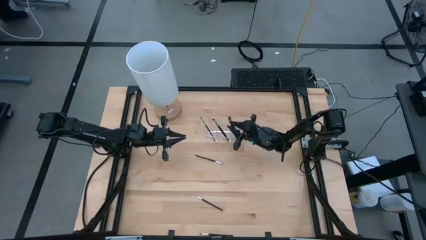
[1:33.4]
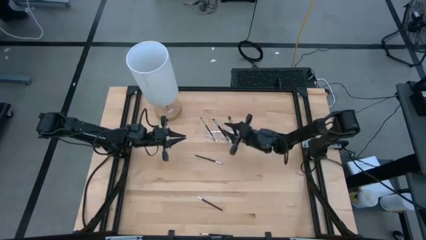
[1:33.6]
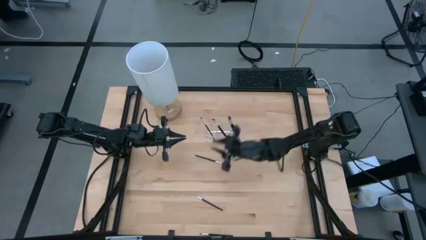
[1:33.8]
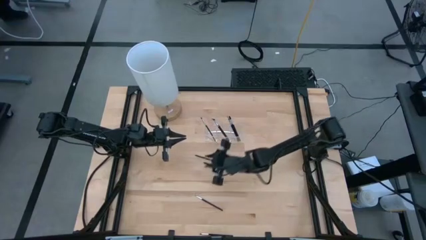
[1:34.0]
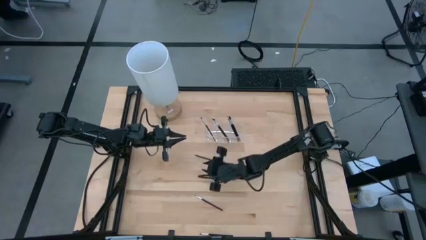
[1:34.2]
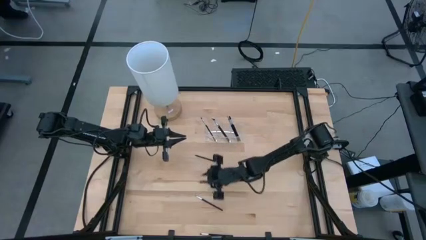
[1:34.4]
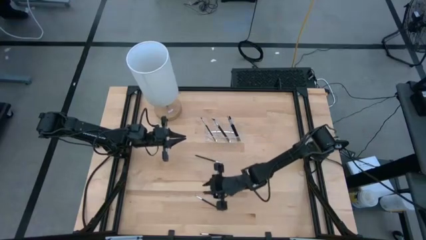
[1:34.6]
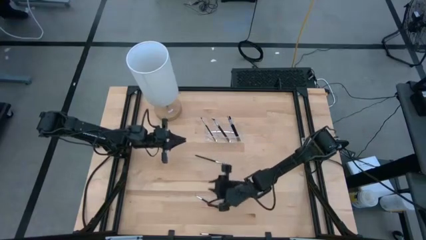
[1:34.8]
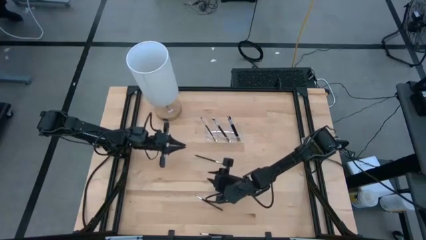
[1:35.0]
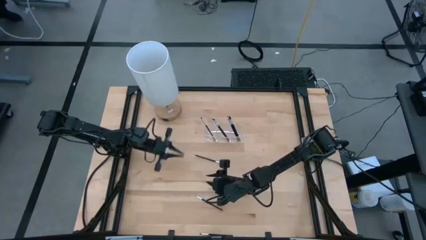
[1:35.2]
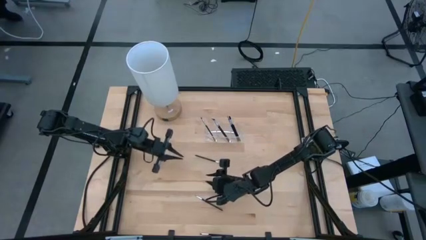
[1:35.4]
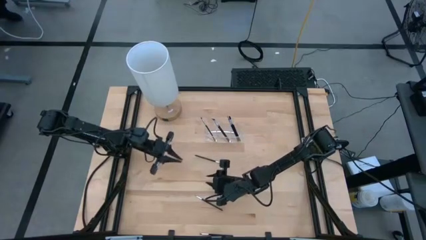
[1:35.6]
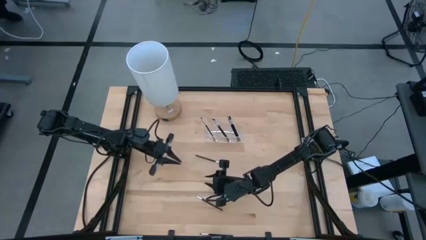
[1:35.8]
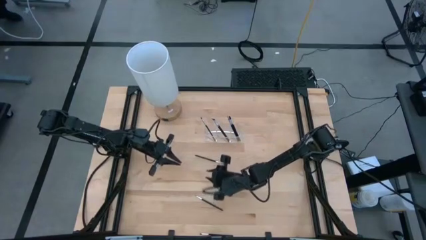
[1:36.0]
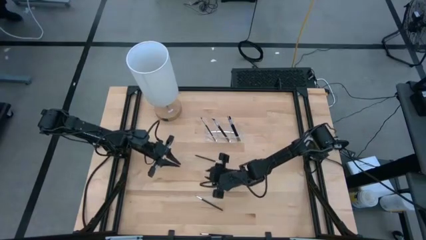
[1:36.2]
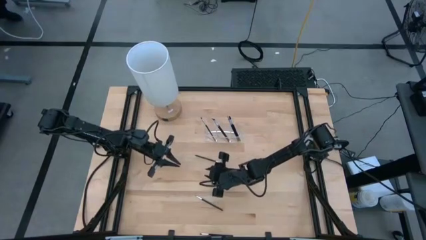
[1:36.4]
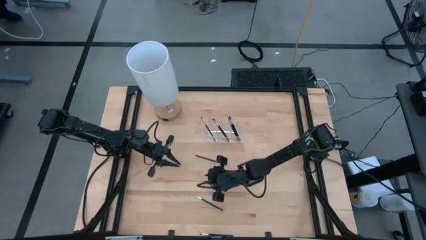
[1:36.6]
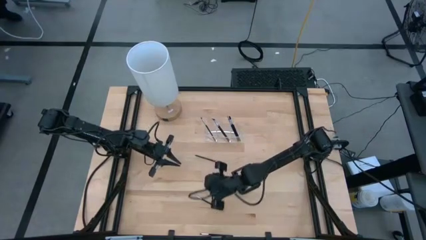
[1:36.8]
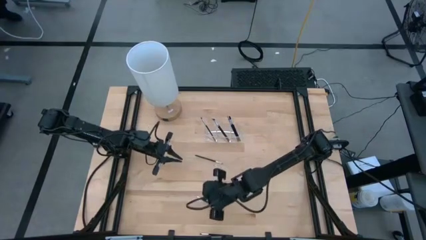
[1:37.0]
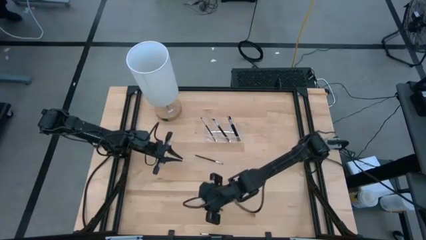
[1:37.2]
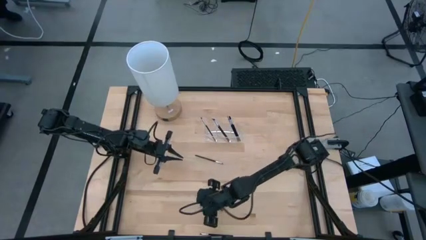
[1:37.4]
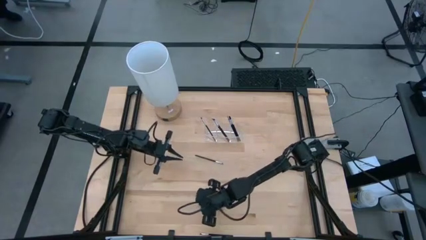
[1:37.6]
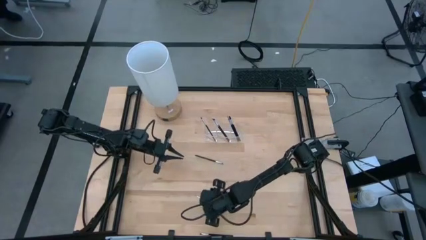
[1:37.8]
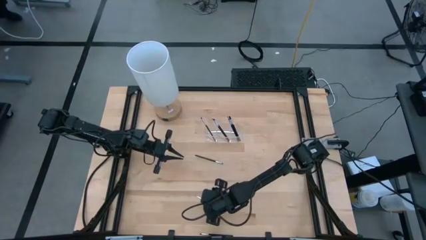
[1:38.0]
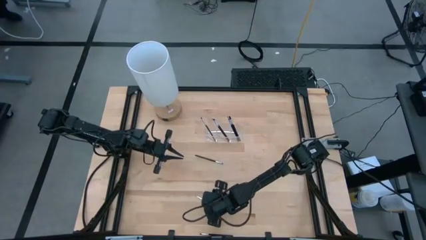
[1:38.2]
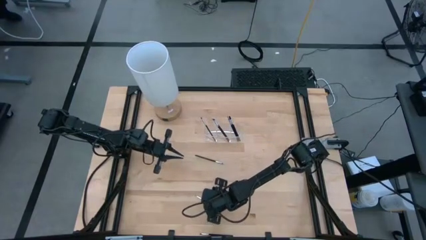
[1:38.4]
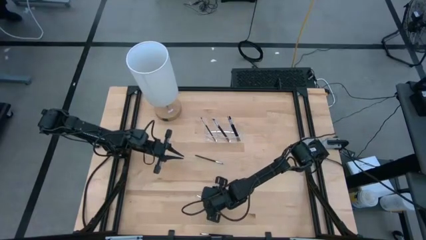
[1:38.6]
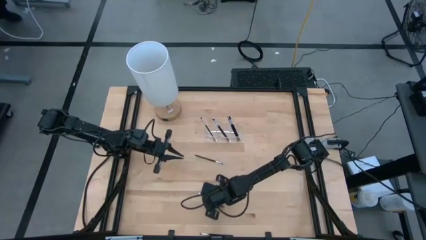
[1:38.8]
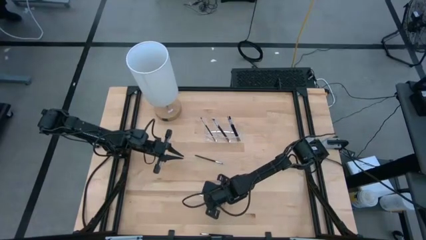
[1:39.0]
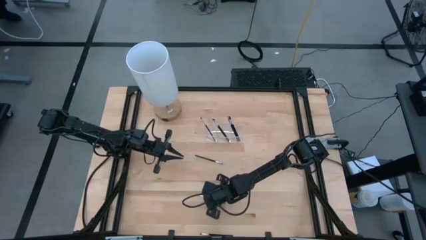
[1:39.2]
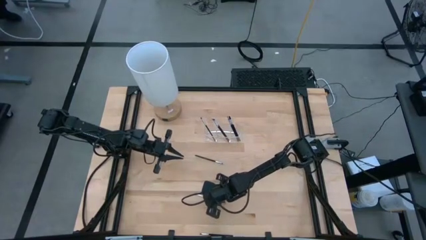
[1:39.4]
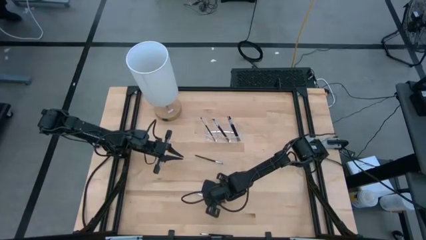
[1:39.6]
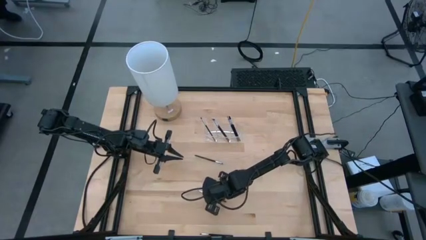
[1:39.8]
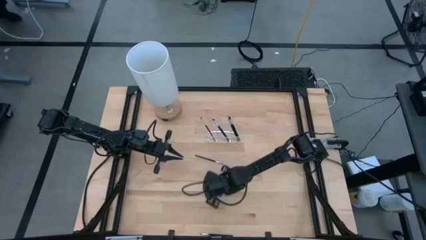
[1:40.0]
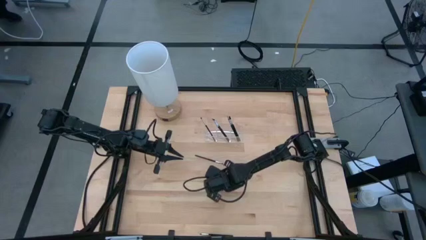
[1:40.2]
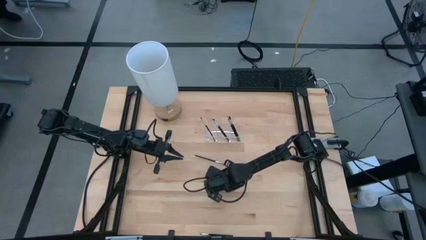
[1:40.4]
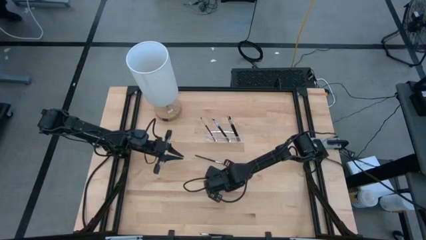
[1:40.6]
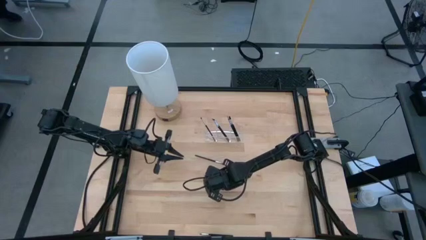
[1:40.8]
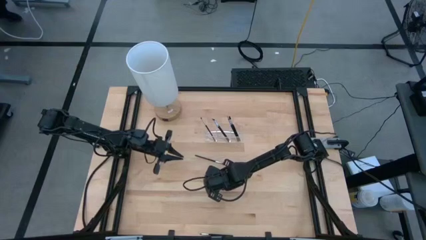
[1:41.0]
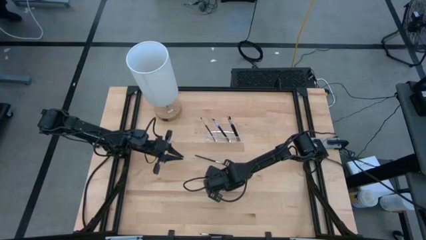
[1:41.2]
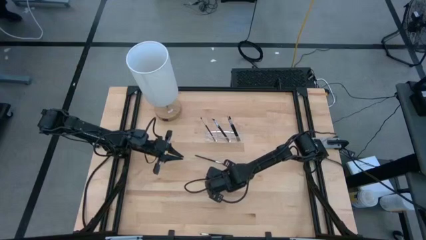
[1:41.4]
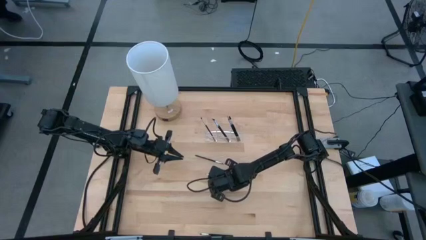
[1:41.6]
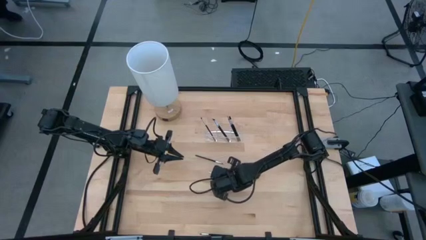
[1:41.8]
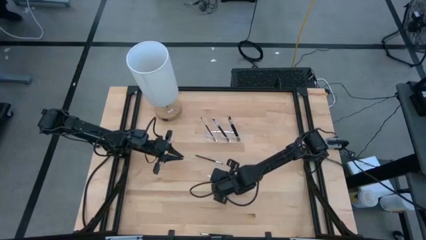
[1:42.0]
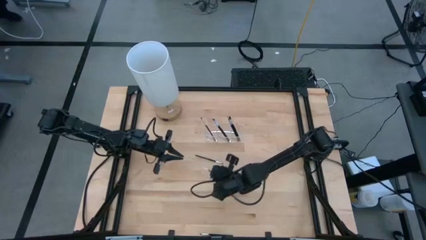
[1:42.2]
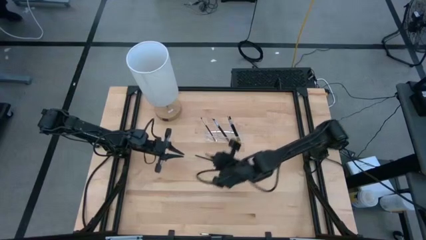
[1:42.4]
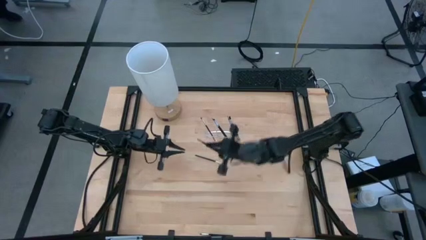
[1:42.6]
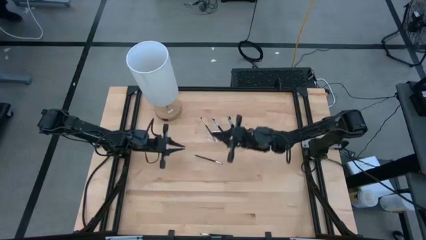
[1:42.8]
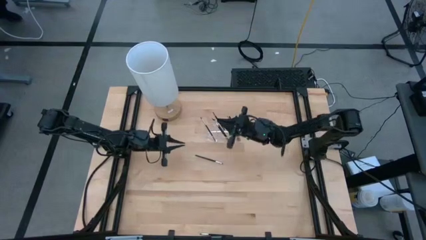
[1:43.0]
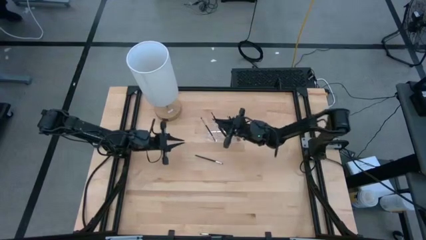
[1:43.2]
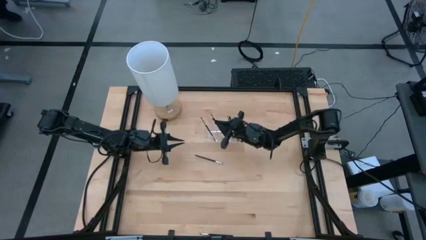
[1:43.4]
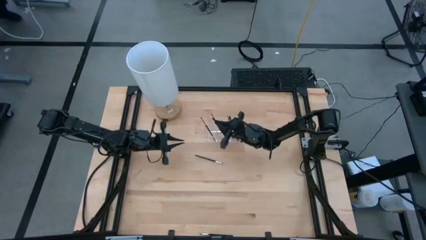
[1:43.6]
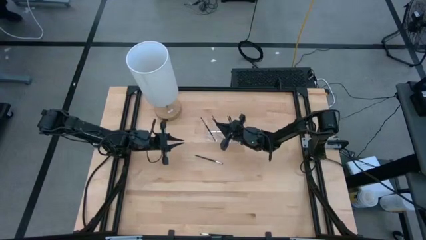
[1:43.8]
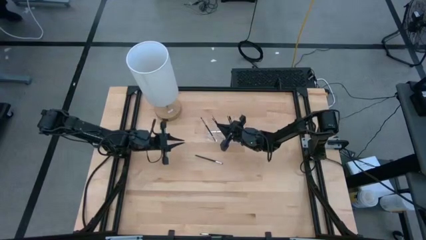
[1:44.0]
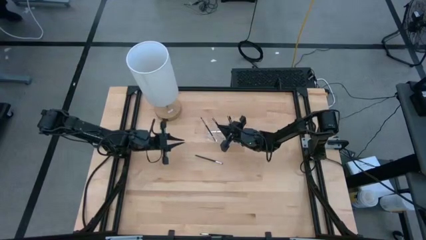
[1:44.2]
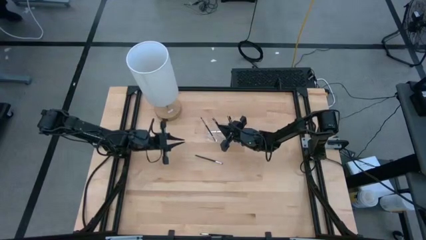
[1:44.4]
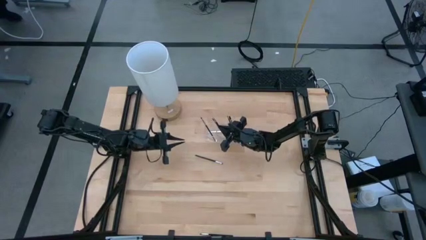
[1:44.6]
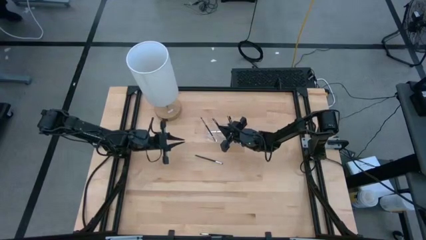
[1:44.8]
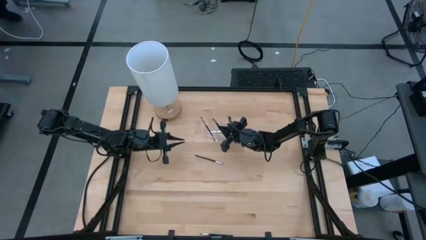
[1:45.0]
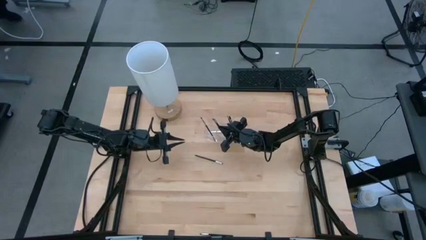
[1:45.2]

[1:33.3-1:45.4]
Task: Put items in baskets/containers
Put the black liner brush into the transparent organizer

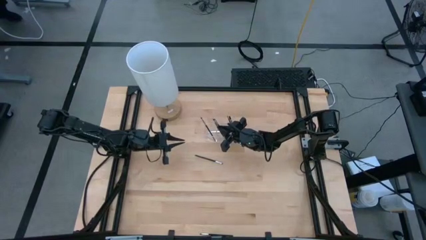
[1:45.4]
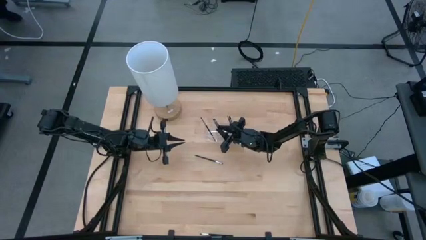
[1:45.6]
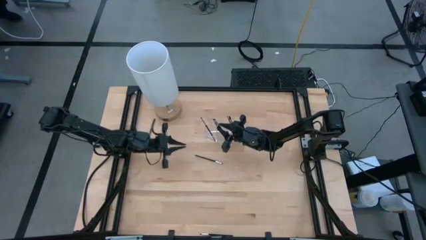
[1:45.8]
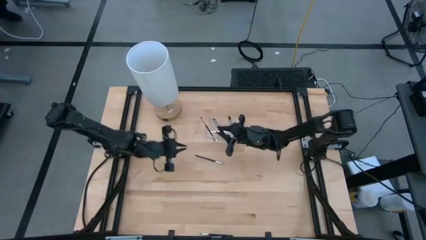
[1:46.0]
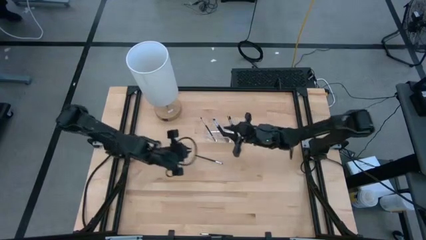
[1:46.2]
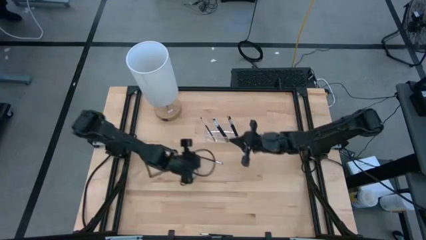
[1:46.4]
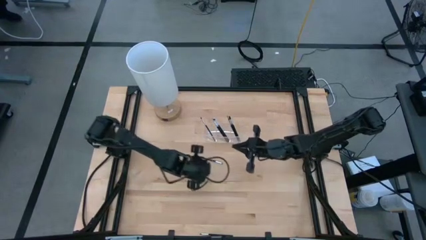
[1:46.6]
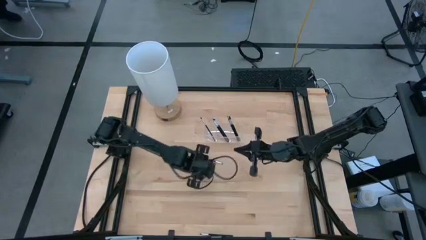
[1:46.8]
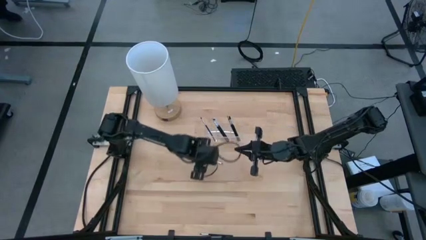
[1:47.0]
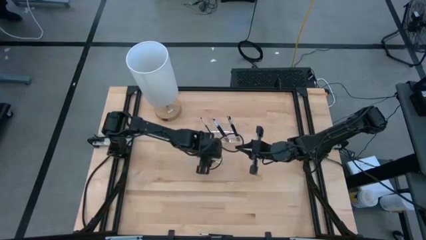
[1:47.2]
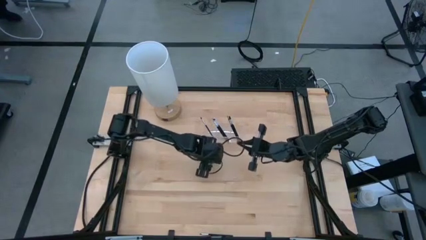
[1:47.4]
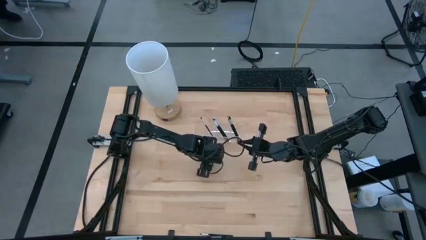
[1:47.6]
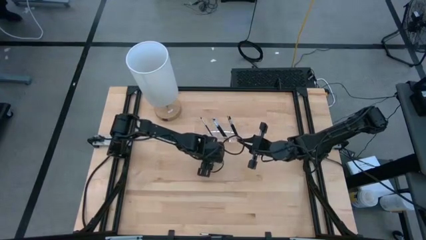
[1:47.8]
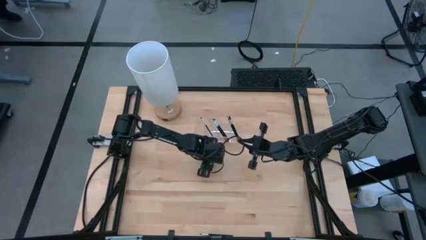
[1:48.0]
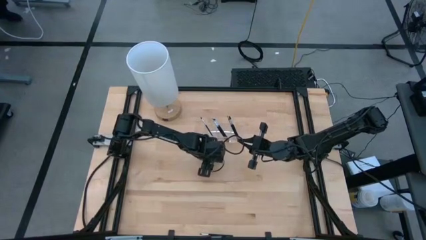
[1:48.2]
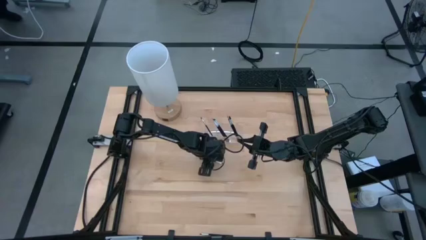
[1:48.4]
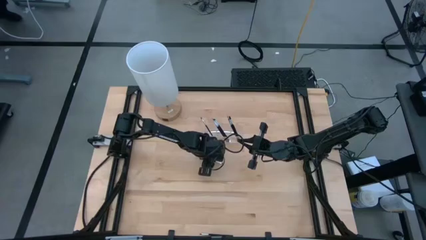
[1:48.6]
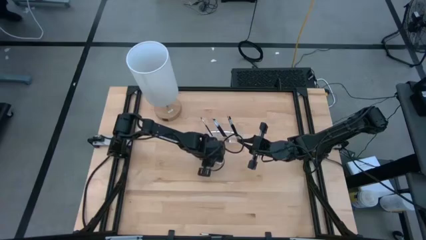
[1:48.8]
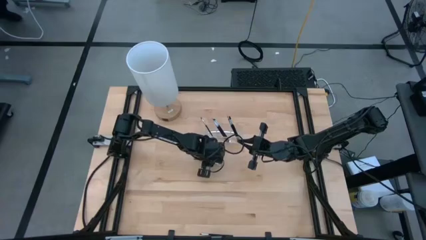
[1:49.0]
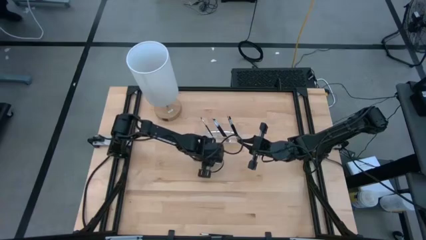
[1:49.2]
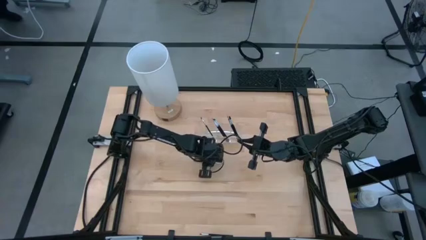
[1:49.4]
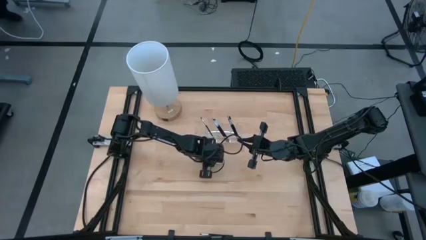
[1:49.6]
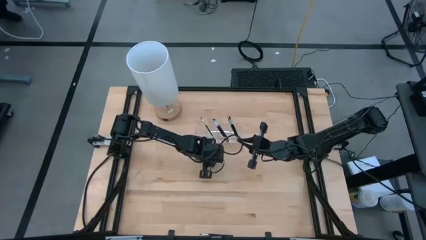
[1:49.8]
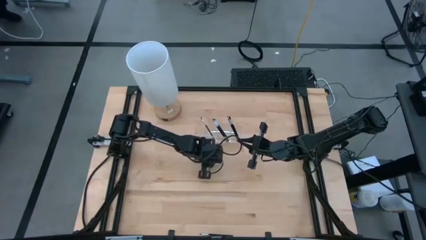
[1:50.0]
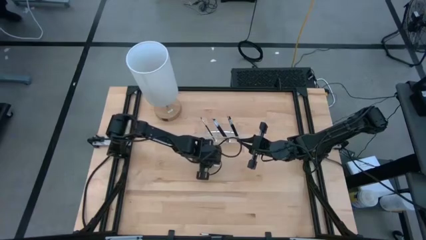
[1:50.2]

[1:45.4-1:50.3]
Put the black eyeshadow brush into the transparent organizer
